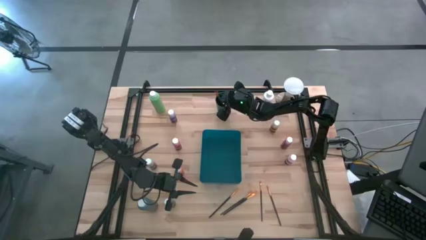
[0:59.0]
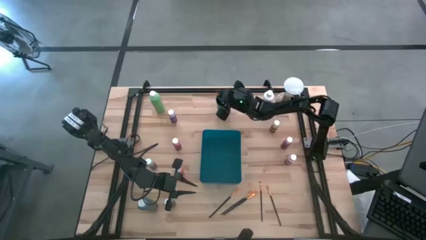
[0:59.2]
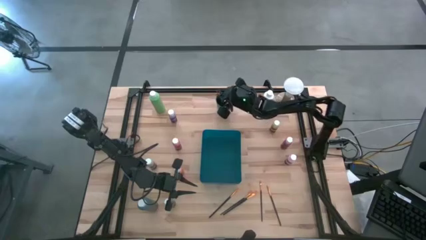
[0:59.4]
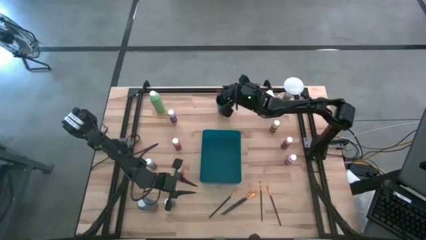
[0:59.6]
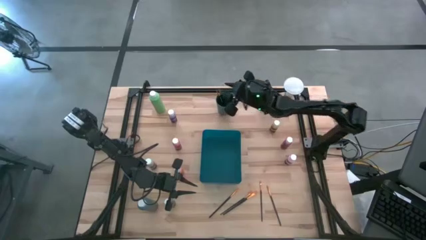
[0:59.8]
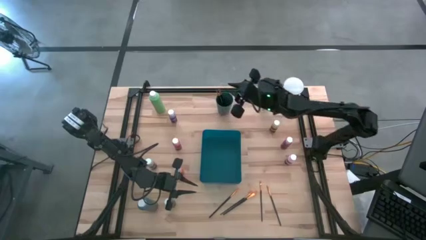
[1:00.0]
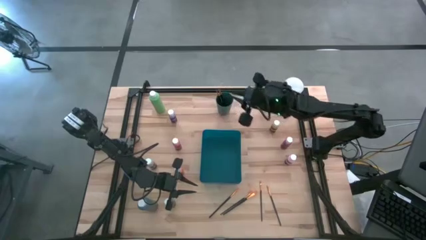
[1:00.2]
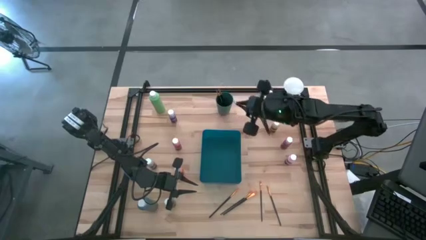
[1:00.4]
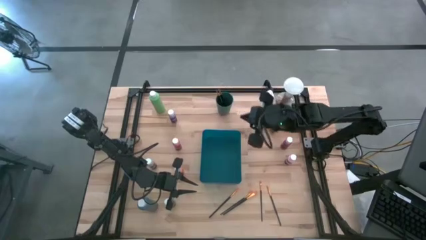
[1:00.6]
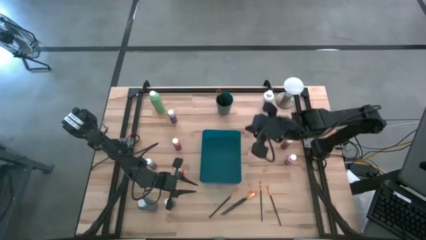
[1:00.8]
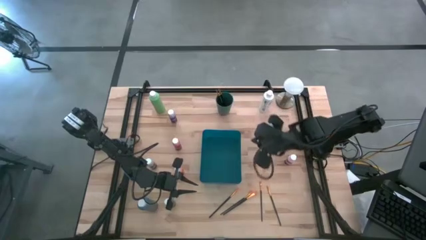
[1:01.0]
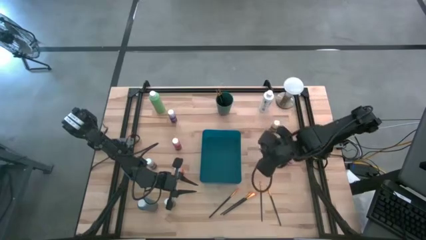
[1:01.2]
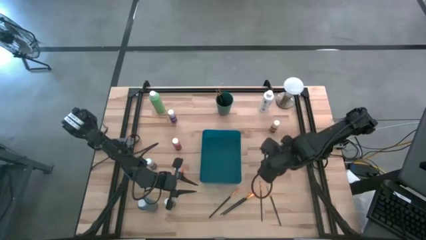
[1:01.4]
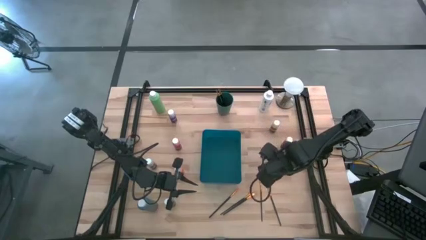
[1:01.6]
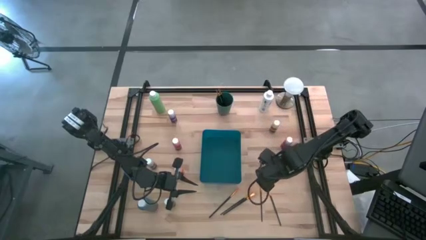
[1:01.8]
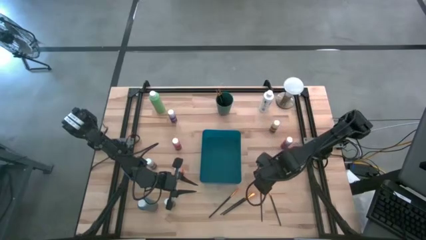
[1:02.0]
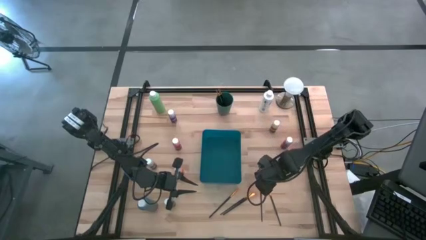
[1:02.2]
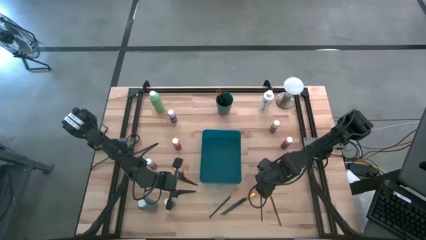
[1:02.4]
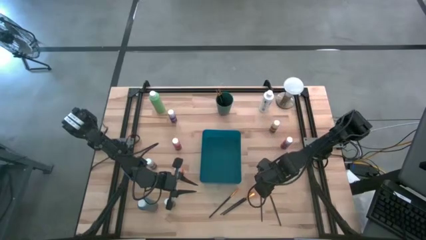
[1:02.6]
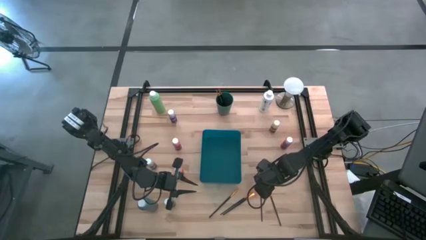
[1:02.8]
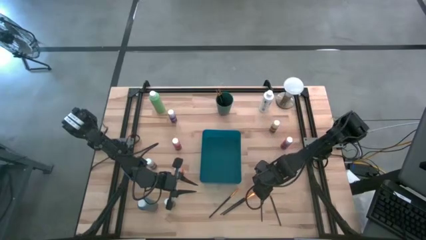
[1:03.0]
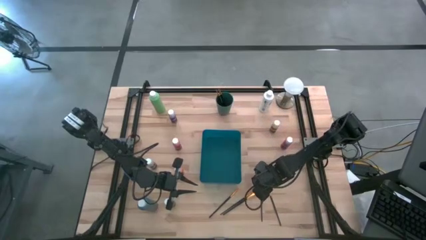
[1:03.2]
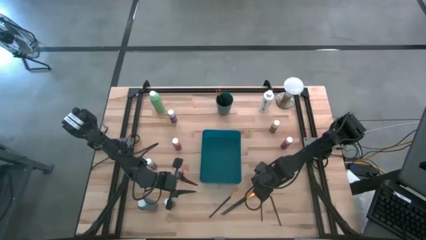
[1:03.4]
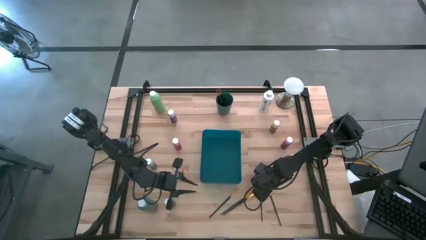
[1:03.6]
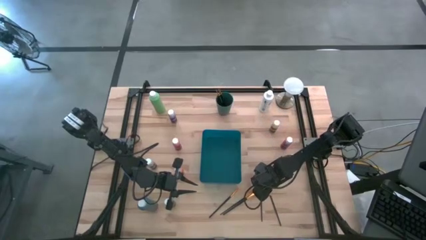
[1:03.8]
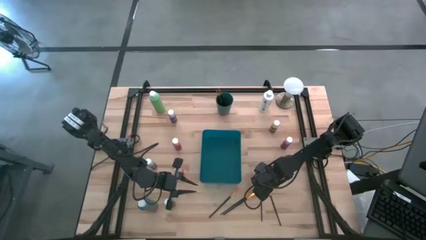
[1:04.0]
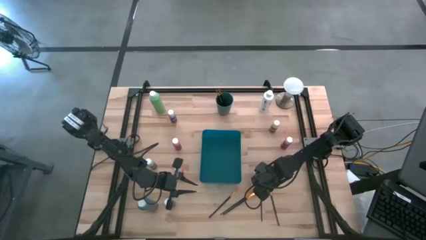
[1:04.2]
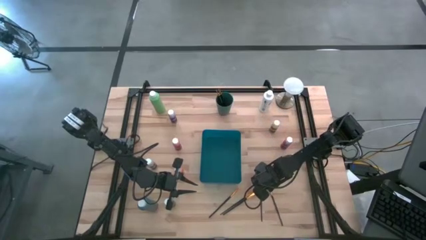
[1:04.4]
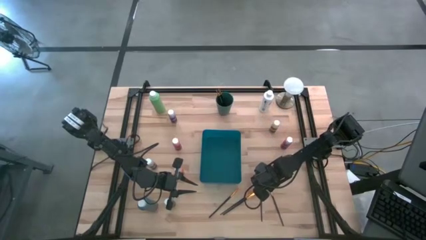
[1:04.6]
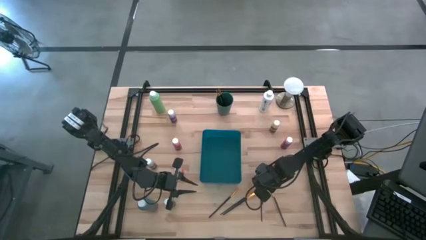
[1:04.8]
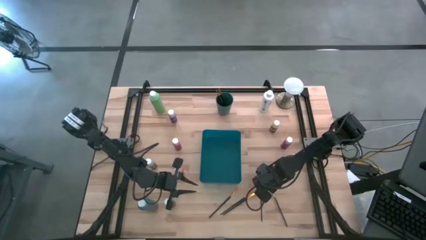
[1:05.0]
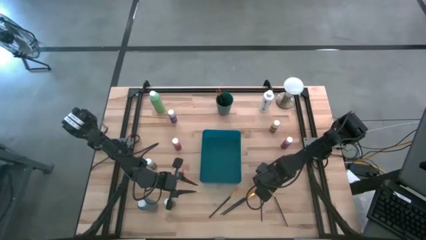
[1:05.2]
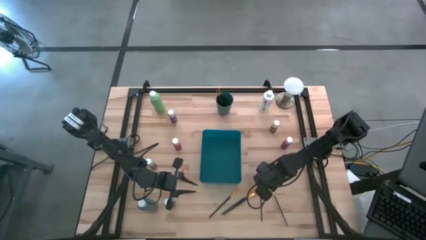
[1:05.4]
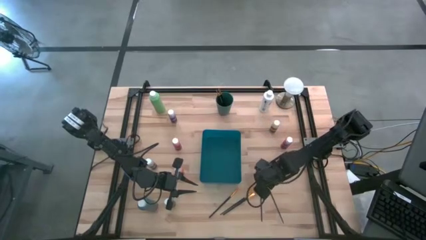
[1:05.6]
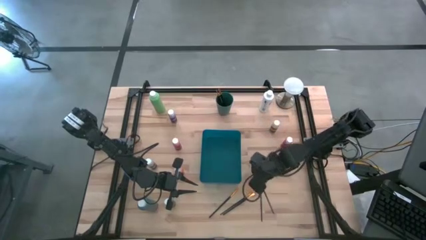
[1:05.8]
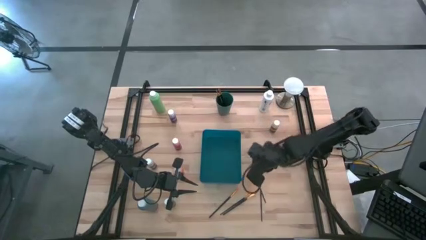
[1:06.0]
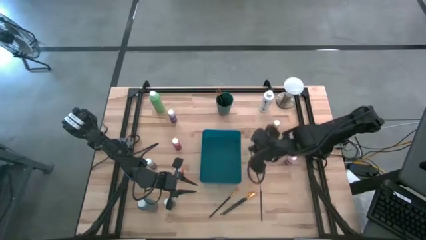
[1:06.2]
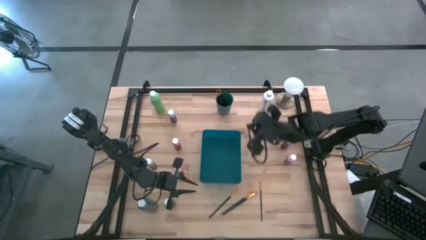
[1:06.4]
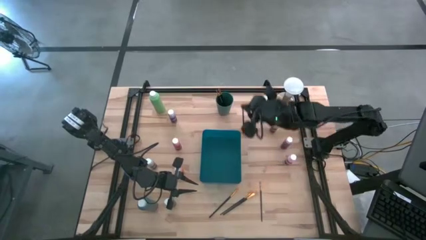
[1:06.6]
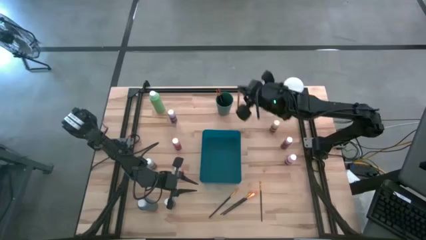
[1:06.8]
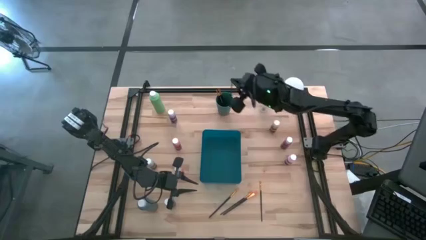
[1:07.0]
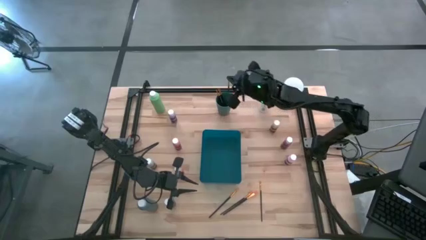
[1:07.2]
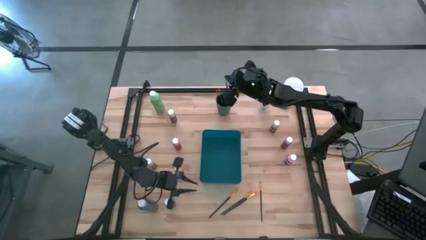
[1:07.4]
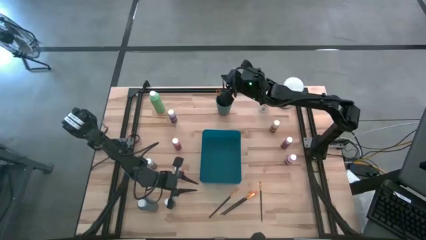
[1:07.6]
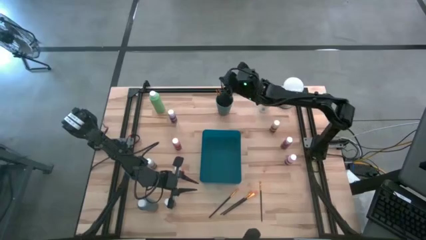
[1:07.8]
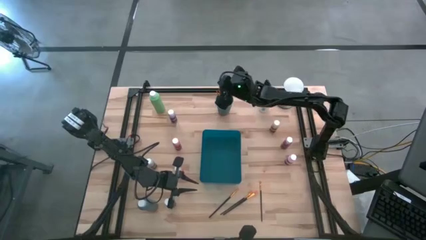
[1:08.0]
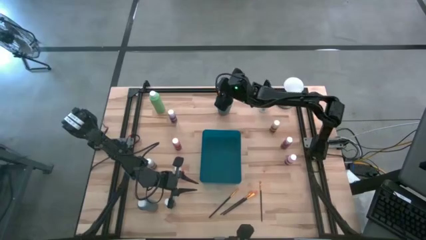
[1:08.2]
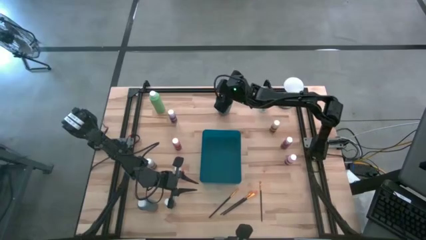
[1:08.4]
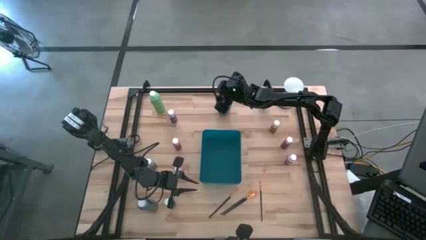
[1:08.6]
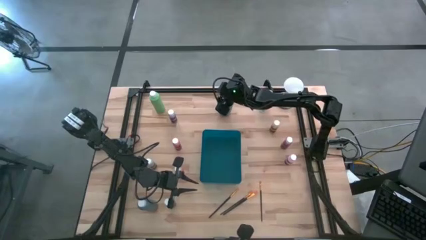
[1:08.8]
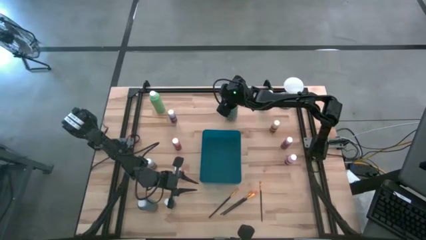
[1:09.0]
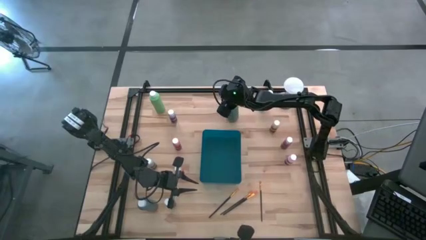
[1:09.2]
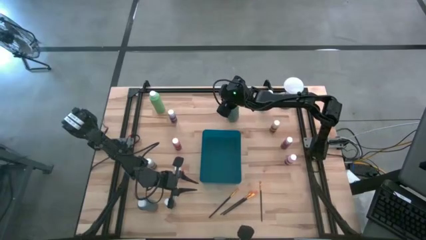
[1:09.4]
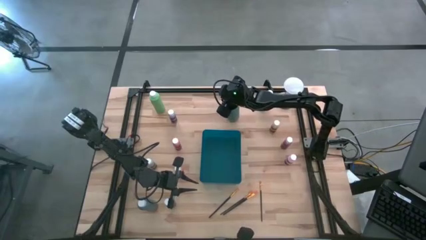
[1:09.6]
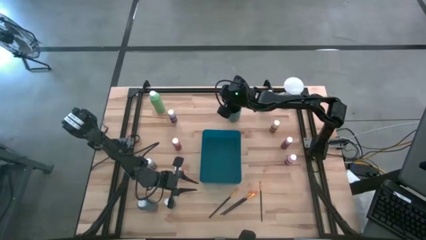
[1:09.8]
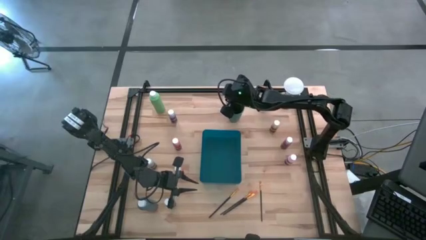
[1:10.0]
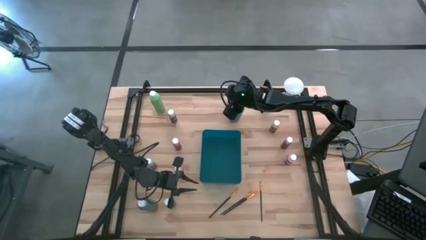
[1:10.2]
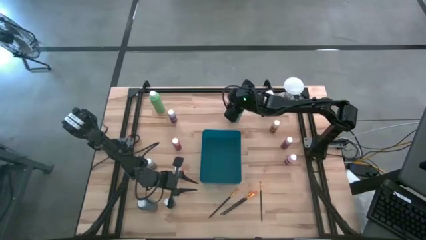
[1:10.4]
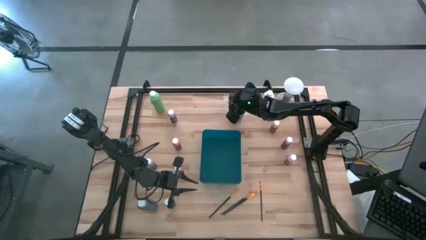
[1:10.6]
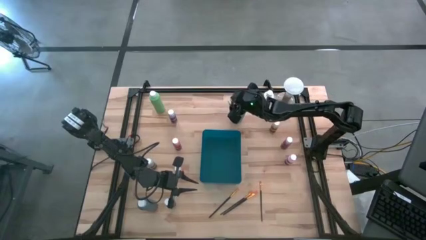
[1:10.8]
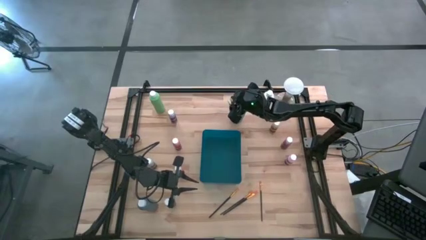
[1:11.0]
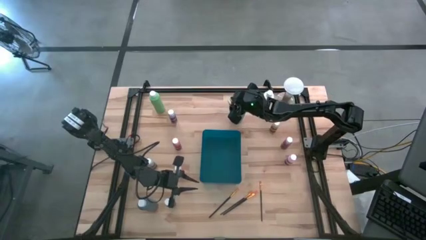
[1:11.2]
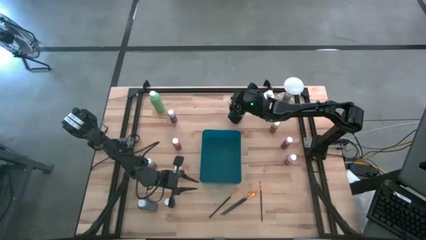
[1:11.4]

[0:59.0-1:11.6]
Task: Pick & Place Paint Supplies
Put the gold paint brush into the green cup

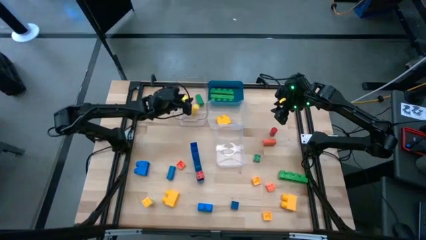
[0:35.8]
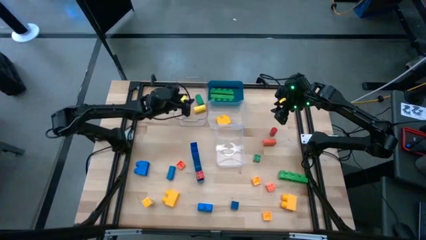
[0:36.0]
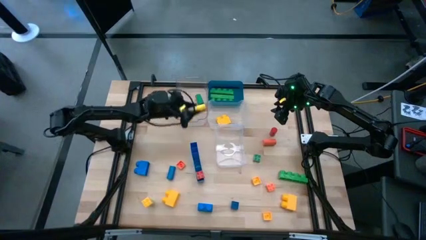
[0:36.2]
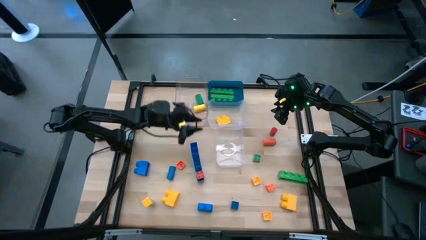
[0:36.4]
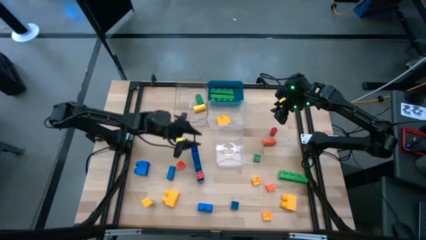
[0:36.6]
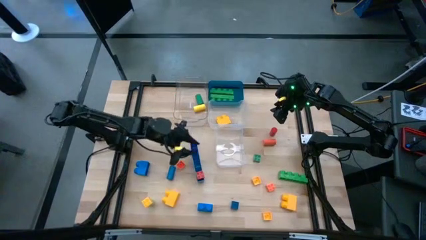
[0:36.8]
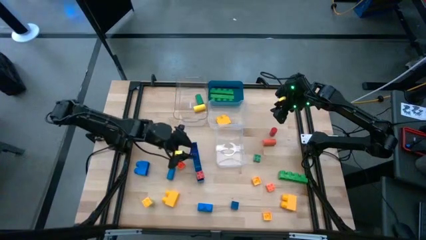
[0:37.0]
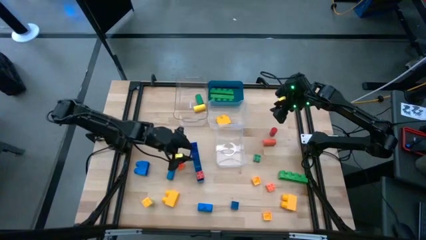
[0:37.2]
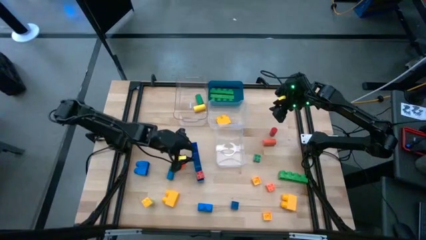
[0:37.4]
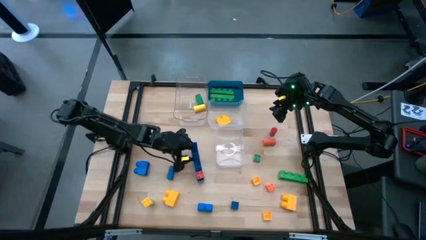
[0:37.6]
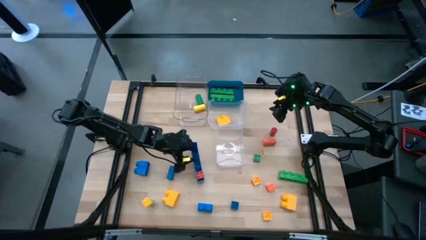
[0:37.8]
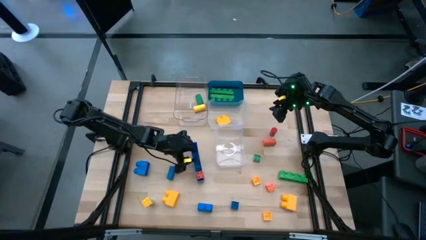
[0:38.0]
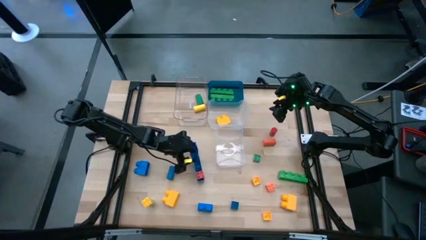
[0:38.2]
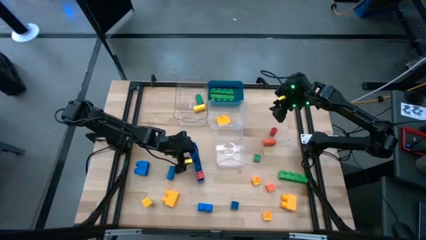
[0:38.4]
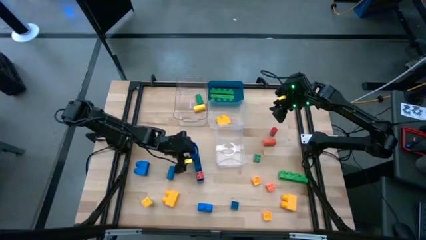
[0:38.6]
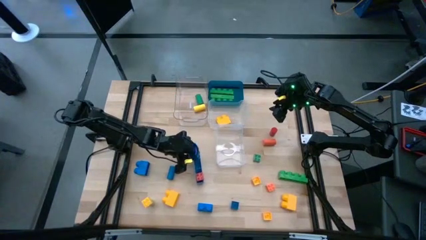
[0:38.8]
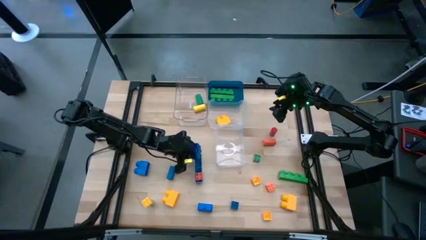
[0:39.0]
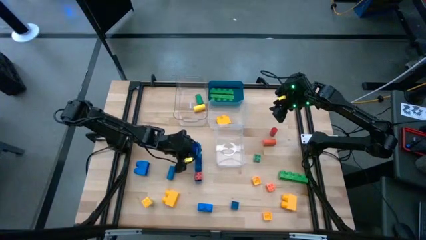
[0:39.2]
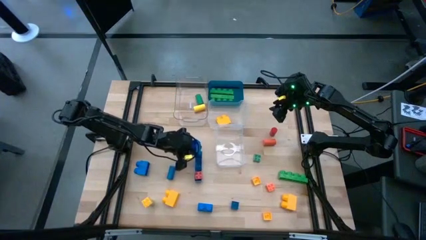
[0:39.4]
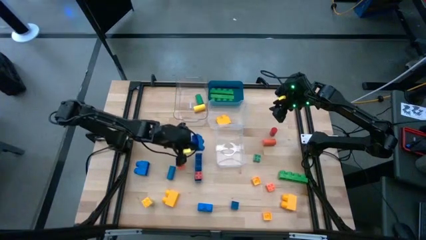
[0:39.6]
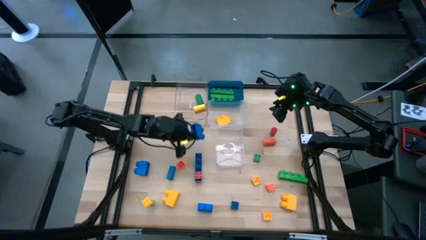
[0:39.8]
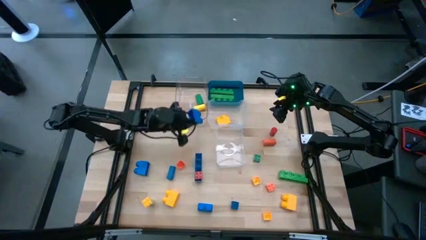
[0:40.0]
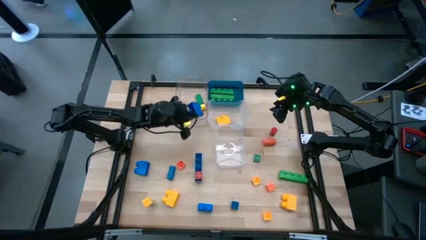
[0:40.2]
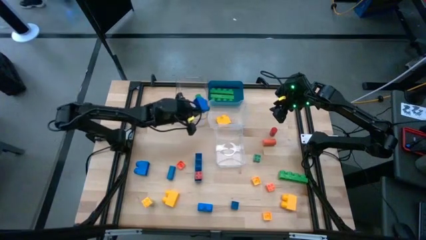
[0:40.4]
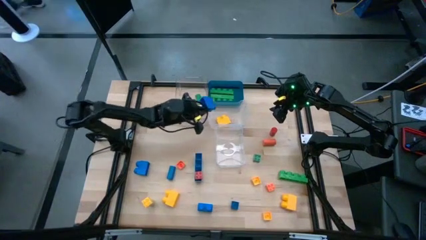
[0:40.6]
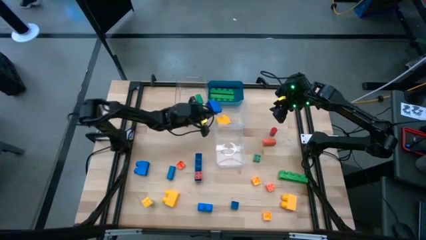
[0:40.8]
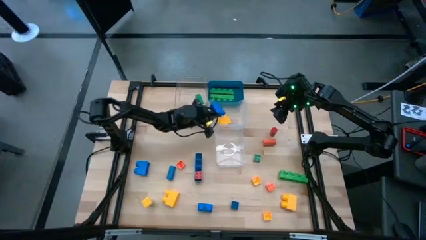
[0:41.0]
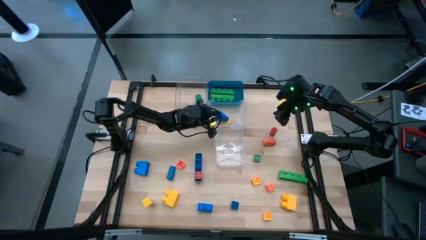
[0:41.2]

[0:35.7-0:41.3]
Task: Sort blocks by size
Put the blue 2 stud game piece into the top right transparent bin
